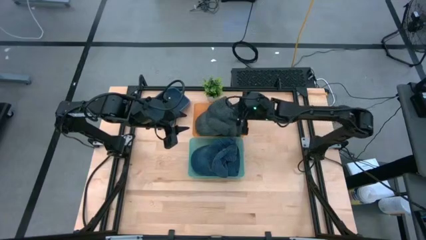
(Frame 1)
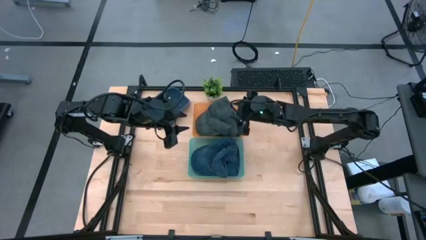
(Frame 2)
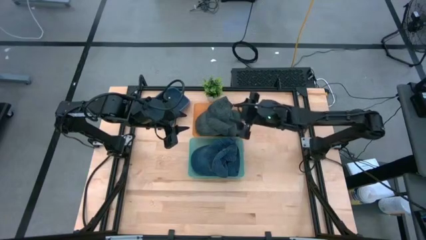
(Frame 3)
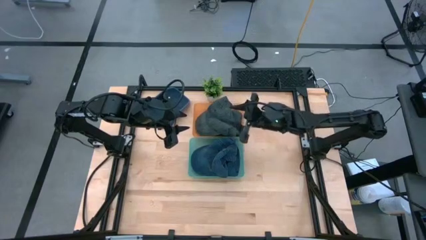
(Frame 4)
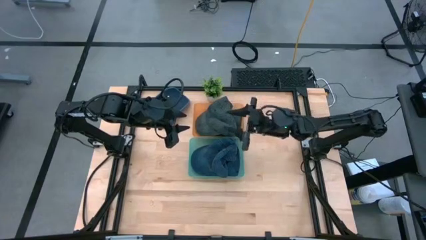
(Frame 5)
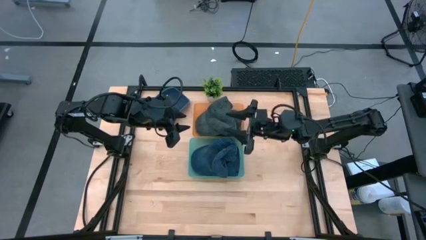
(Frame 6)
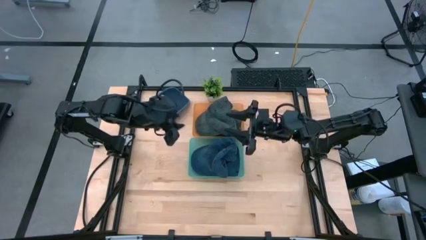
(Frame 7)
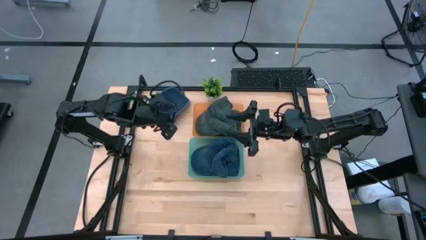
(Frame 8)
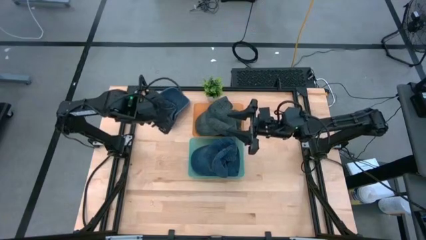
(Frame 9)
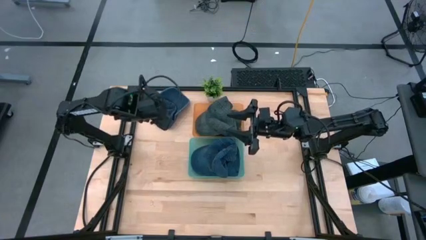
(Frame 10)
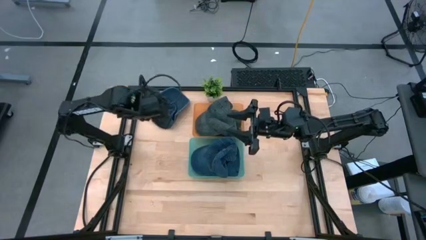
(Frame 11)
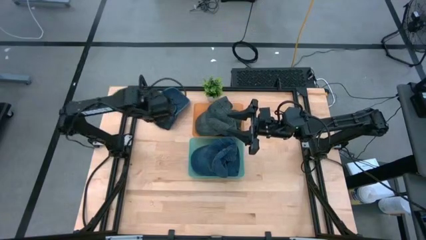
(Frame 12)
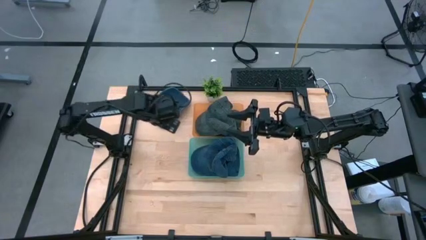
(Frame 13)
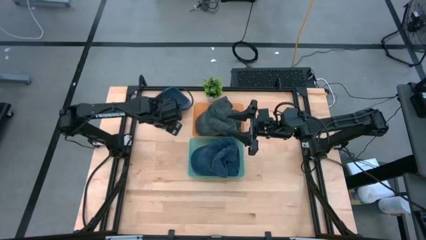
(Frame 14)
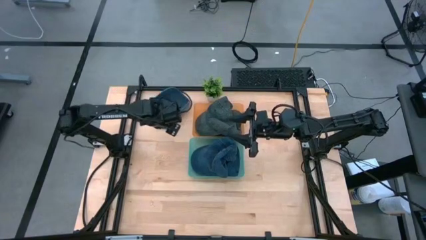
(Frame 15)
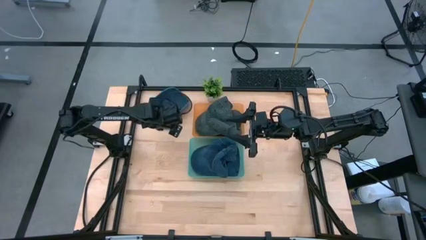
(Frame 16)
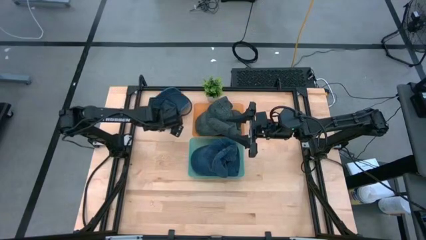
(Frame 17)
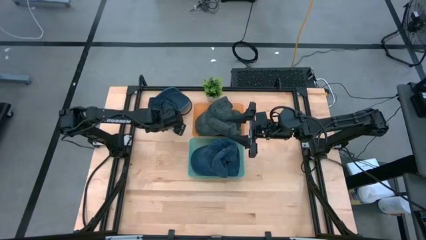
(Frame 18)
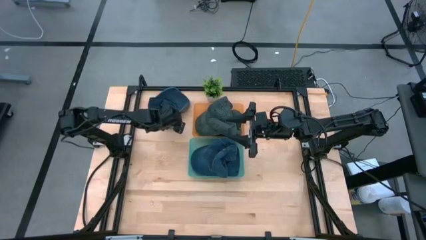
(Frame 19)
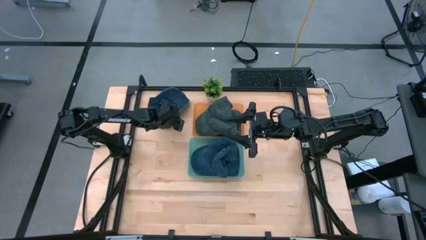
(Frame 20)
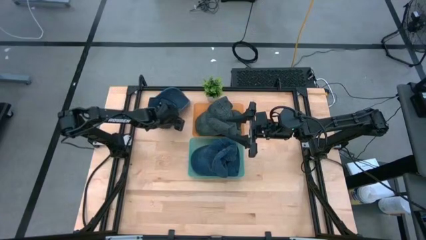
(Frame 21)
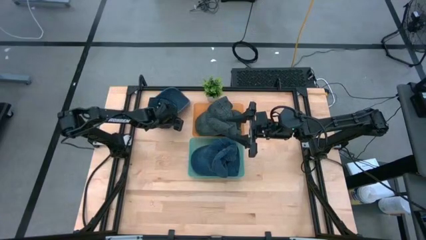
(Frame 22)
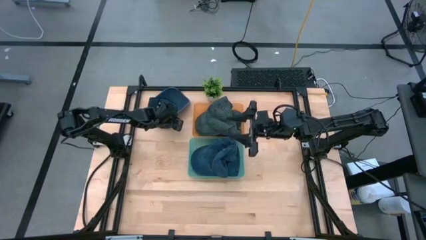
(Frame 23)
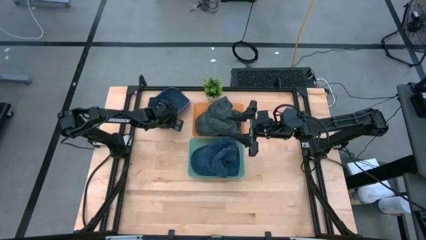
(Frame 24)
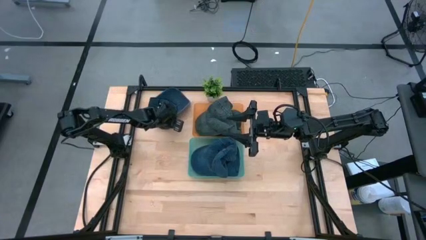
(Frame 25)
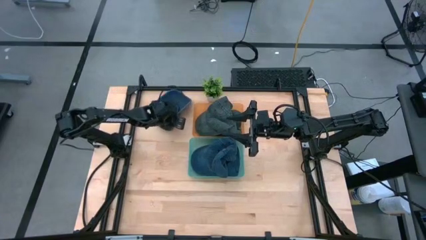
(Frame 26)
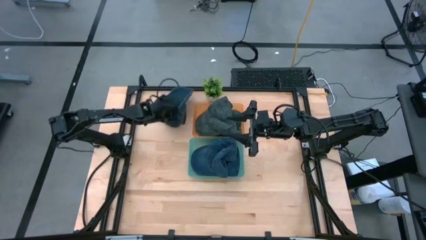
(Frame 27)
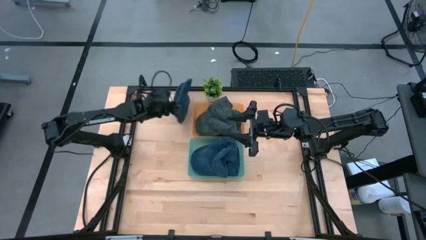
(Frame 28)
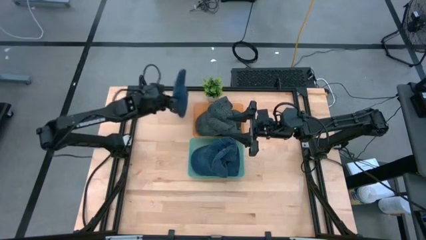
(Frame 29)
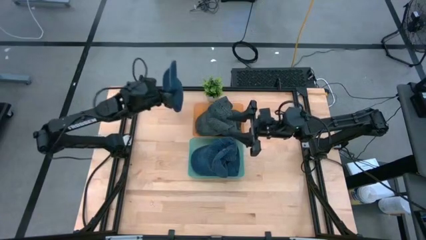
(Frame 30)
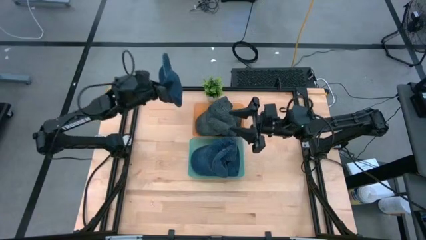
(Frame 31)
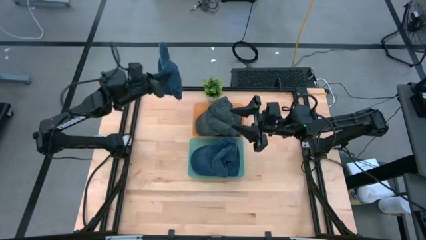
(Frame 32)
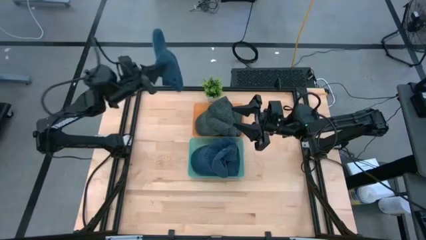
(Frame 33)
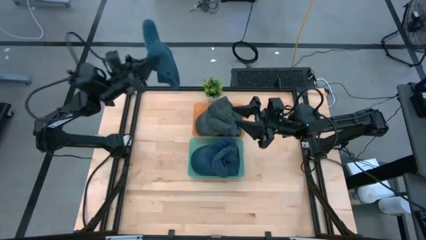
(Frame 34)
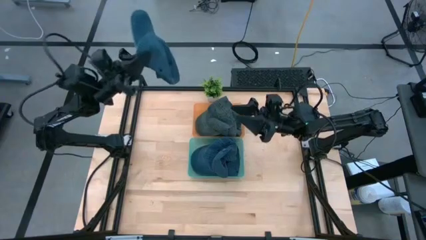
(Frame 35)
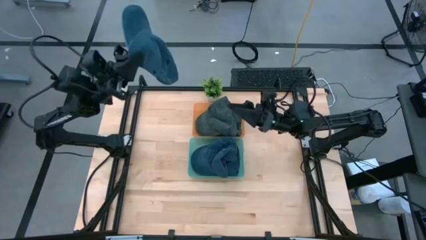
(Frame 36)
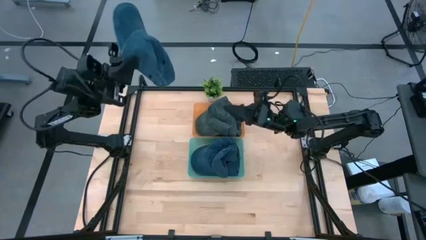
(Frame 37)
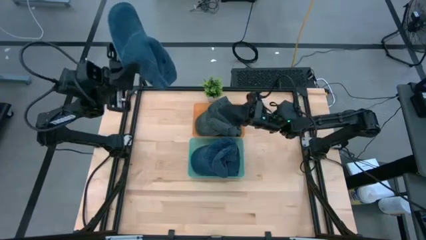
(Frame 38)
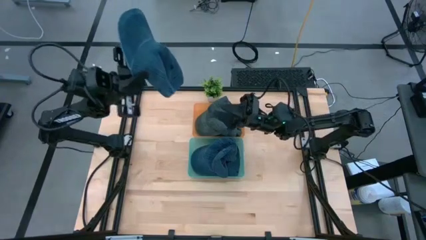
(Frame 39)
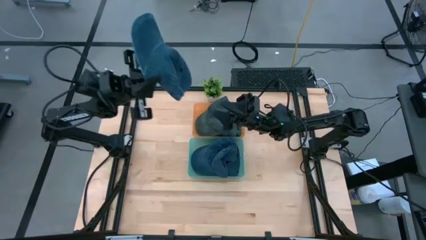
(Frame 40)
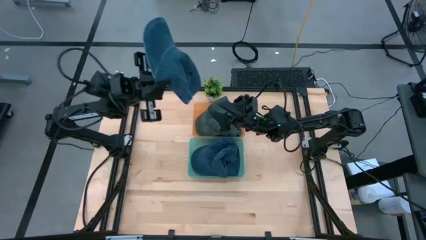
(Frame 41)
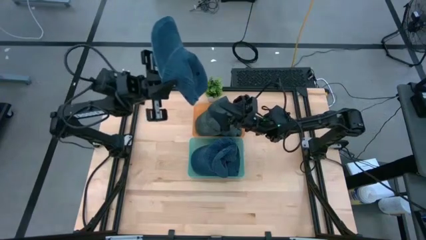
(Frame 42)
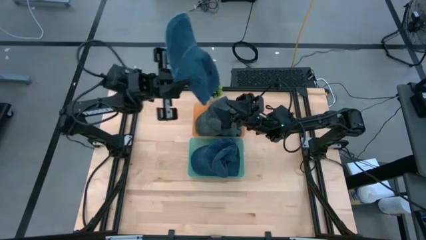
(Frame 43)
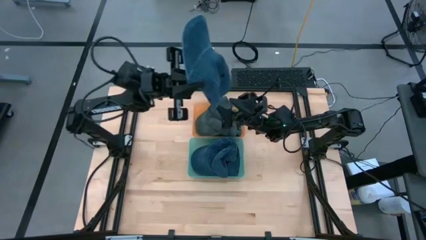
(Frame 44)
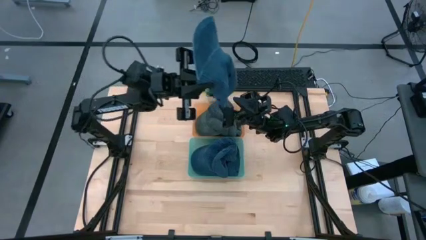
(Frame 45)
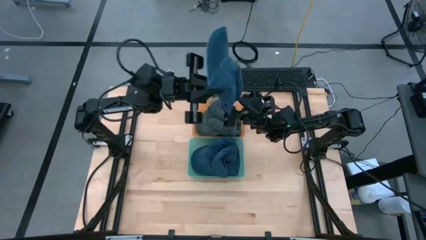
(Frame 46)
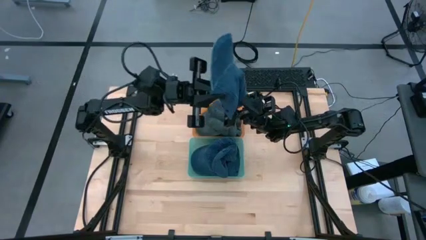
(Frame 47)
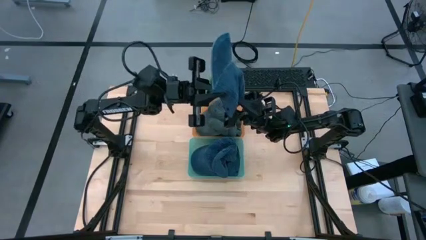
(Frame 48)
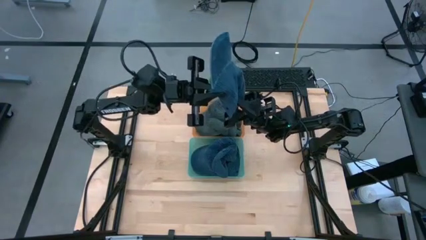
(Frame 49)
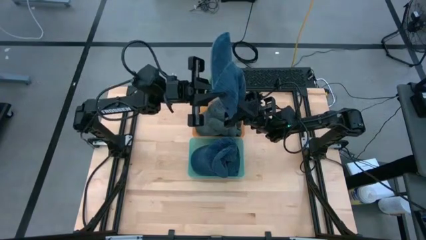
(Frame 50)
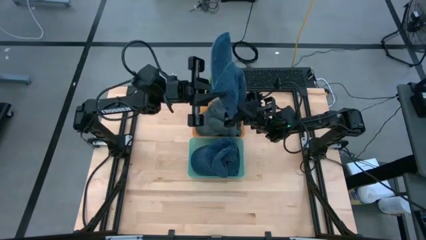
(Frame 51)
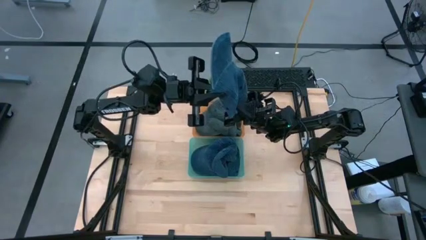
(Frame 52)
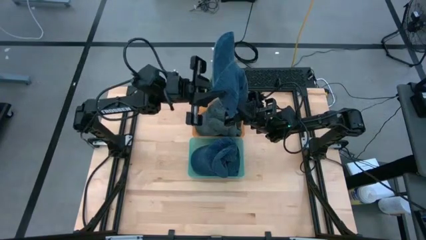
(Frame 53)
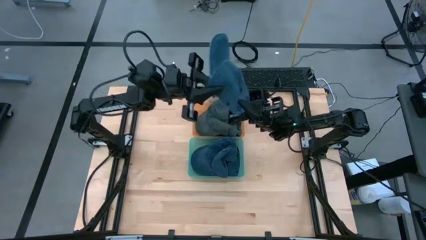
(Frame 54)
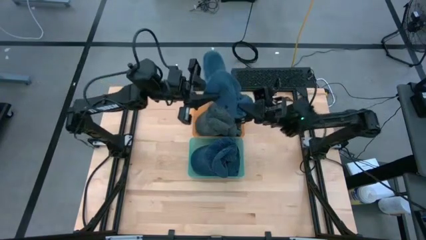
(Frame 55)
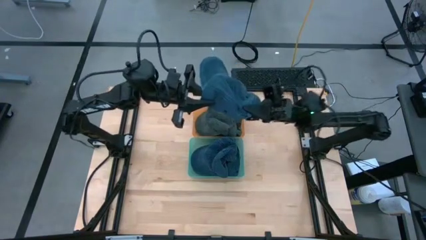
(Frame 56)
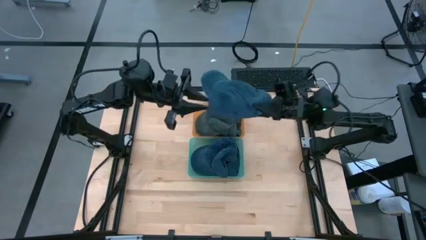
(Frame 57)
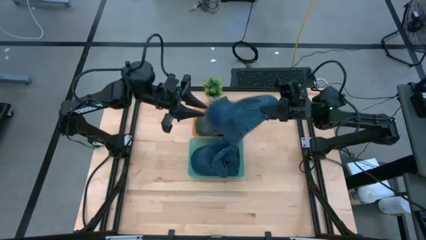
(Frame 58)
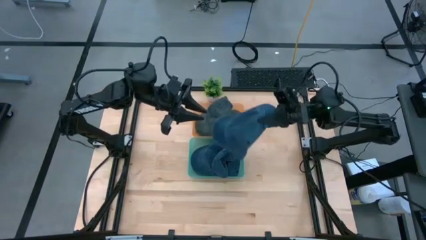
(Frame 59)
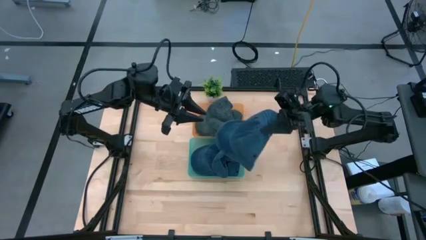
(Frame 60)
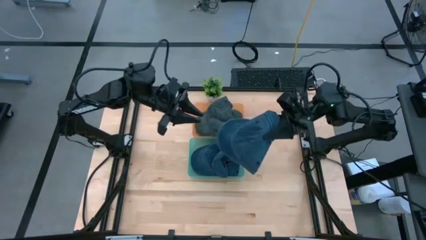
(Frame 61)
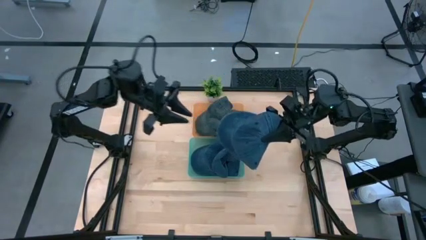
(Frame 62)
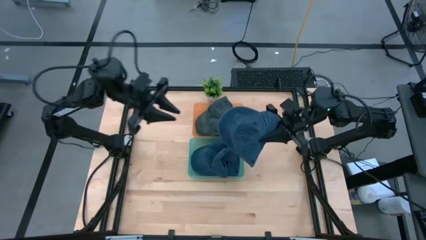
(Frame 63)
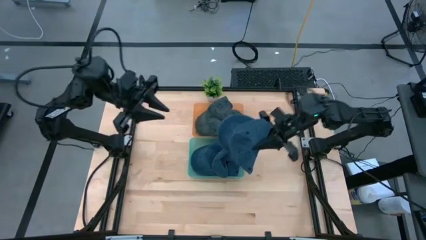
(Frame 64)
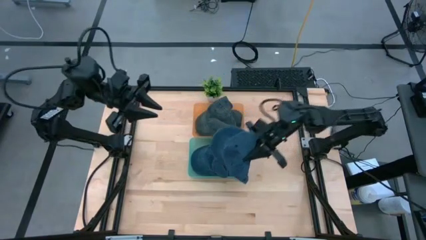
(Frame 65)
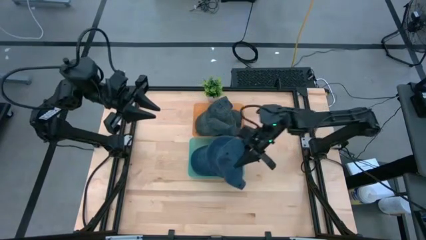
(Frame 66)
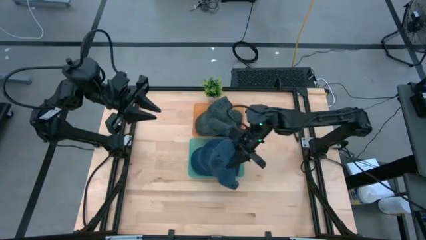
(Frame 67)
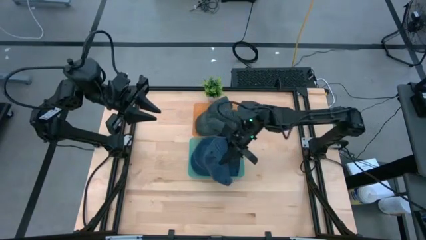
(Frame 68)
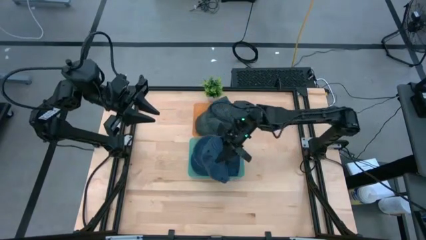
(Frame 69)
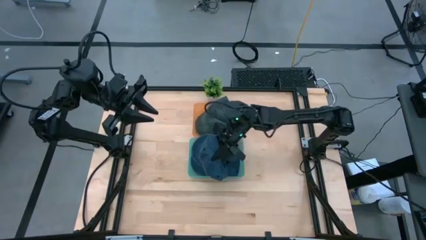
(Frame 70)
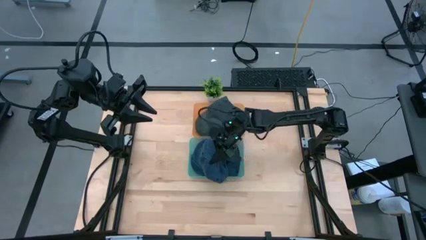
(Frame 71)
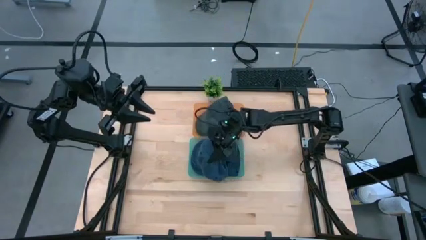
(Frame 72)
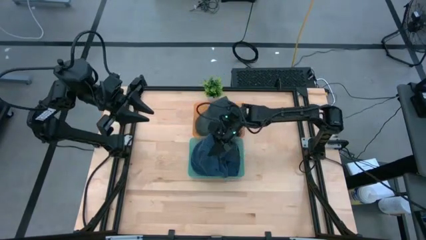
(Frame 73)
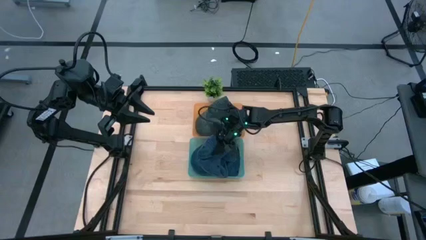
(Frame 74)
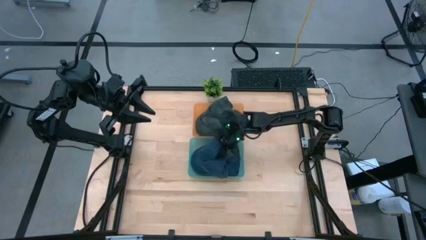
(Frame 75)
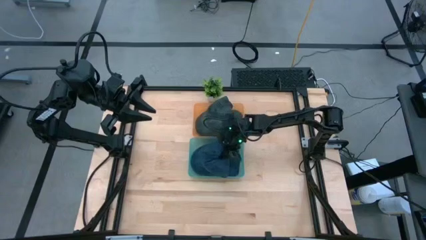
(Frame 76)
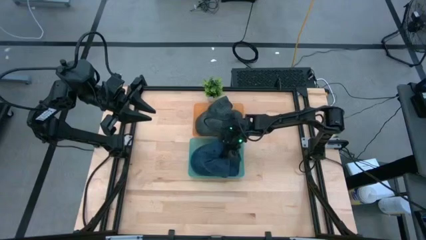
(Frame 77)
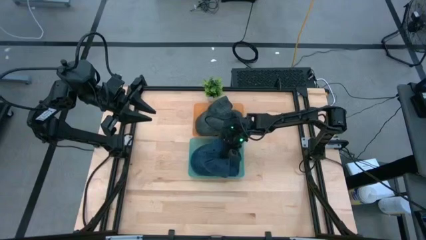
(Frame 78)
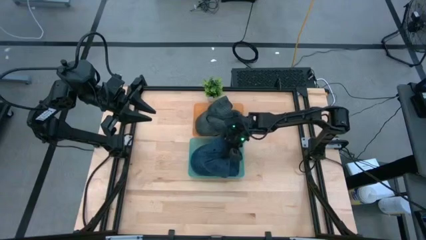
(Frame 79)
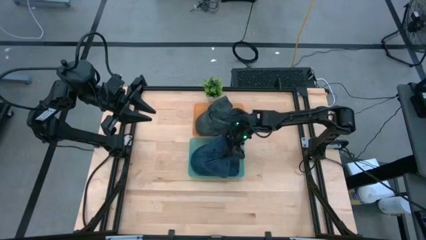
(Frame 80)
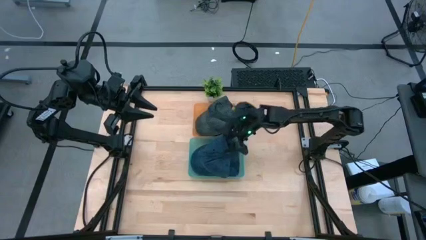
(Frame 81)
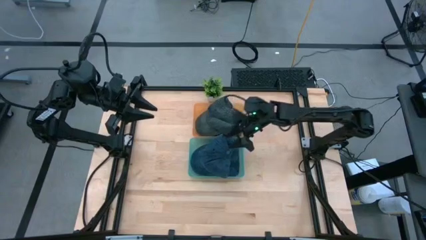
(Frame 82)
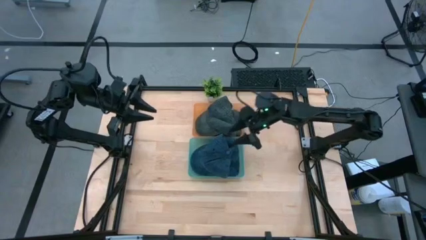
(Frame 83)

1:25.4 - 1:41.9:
Task: Pick & Place hat
Put the blue cap into the light blue bin
